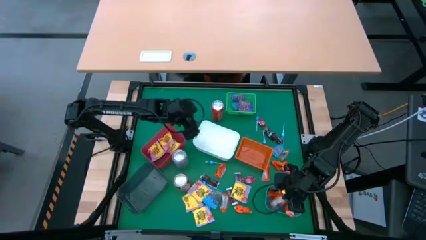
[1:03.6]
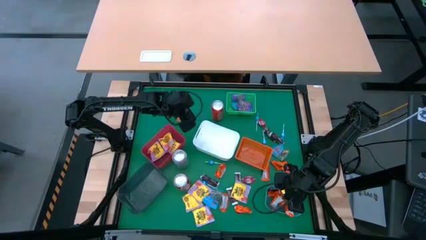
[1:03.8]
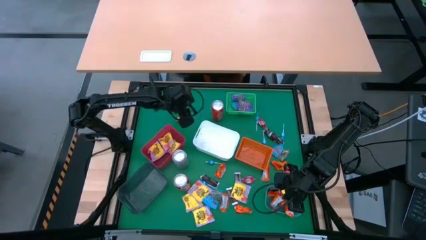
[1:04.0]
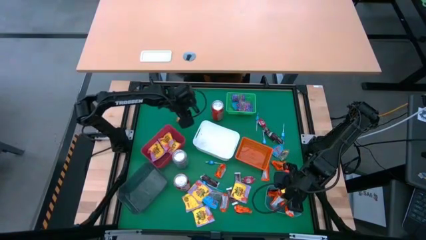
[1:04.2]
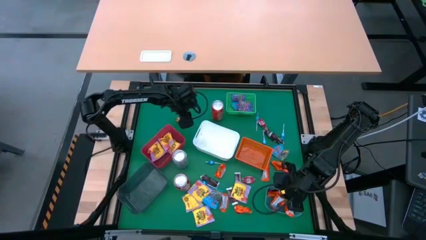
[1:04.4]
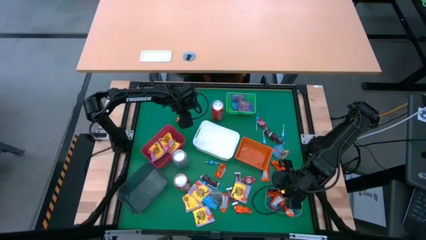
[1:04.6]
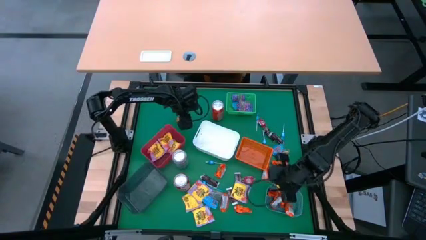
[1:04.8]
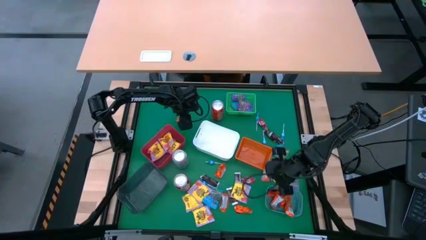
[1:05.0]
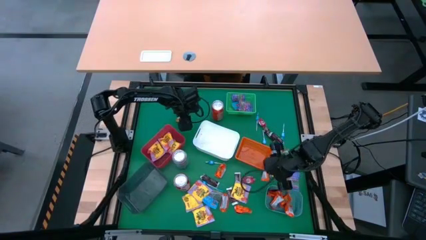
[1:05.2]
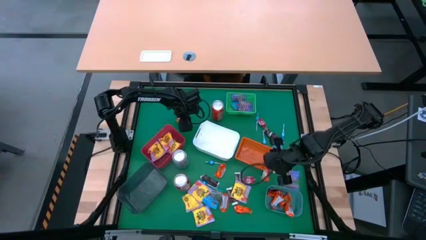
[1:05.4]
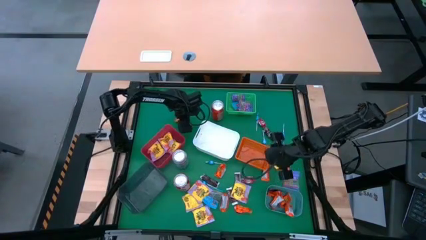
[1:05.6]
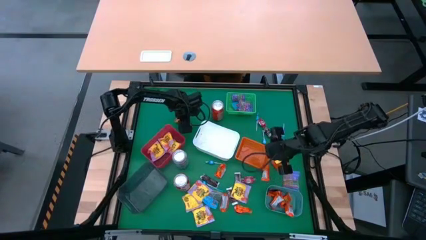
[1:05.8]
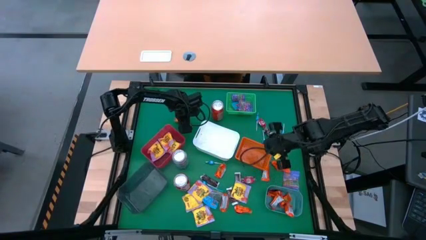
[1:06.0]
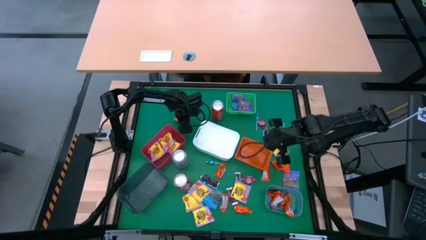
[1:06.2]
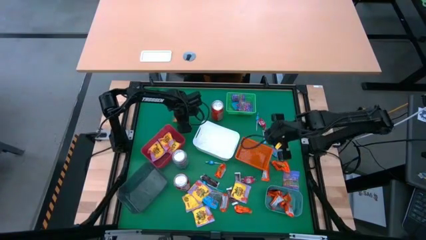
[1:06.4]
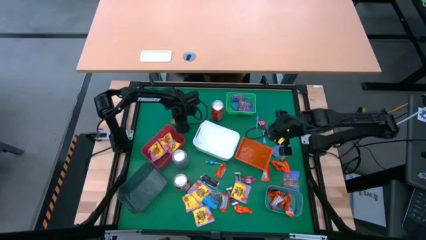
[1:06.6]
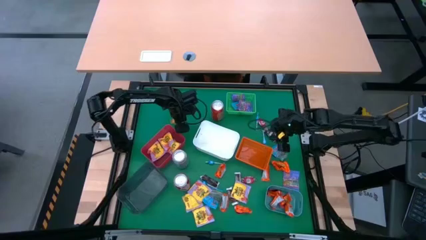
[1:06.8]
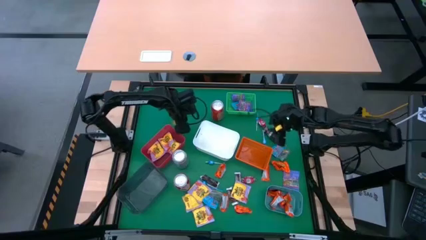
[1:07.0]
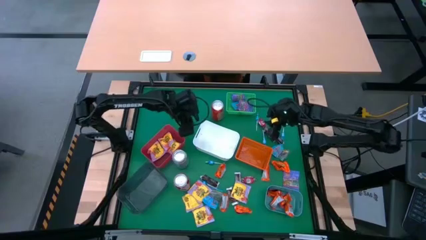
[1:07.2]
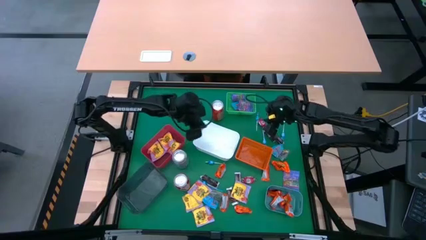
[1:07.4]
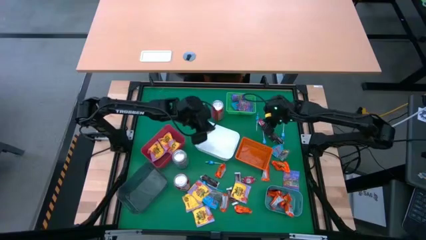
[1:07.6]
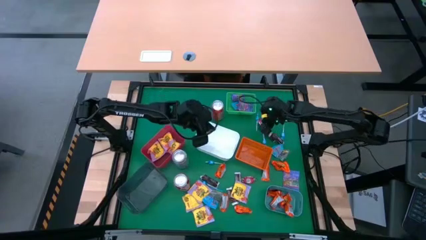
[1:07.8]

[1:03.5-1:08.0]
Task: Sort candy
Put the yellow chocolate into the white bin

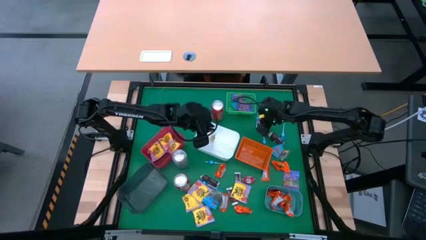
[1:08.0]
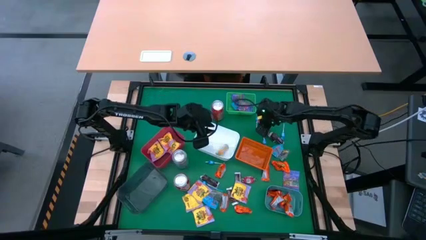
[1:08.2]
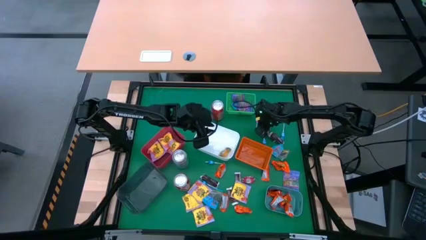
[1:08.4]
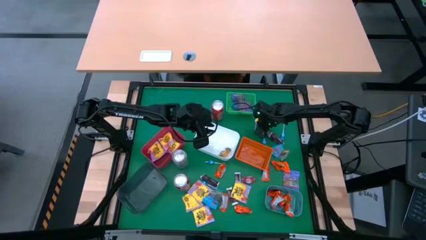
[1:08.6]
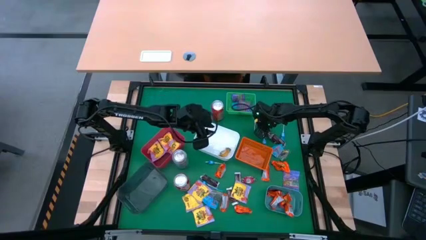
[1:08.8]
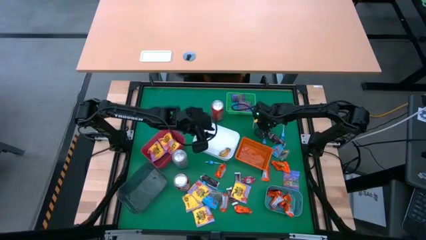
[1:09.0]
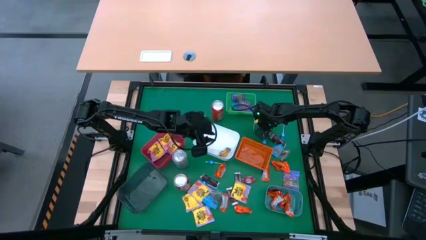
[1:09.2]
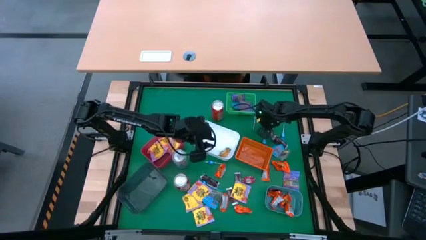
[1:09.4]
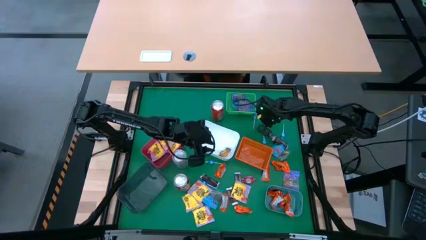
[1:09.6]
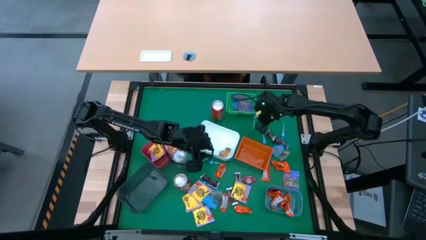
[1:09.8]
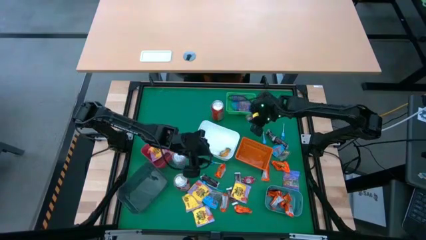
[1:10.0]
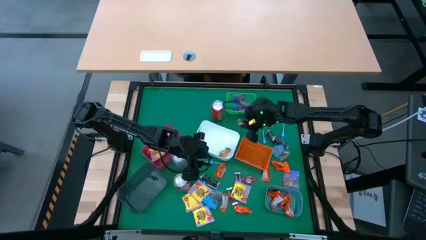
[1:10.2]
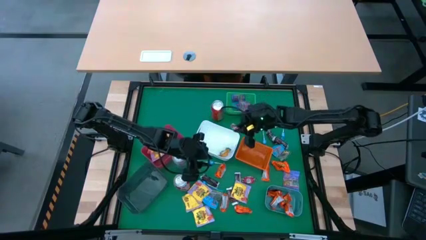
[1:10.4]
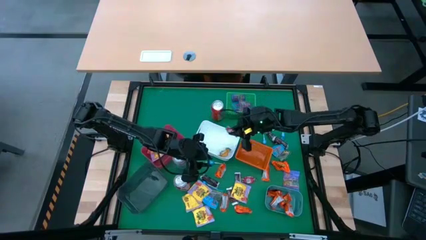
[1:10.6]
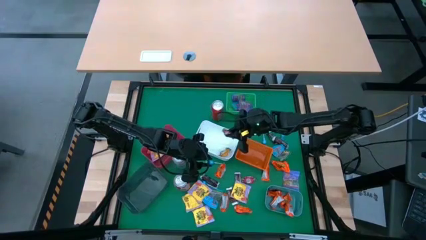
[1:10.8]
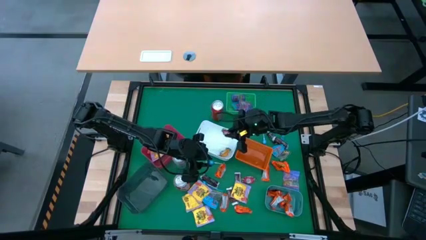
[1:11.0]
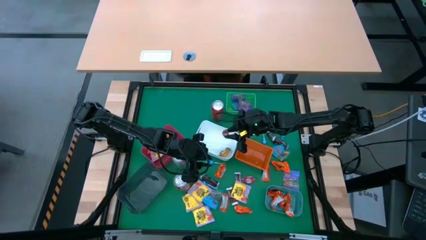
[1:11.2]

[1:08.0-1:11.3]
Put the pink chocolate into the white bin

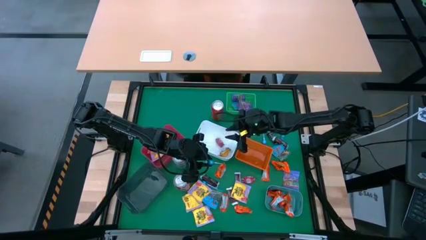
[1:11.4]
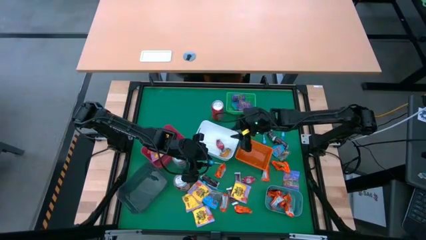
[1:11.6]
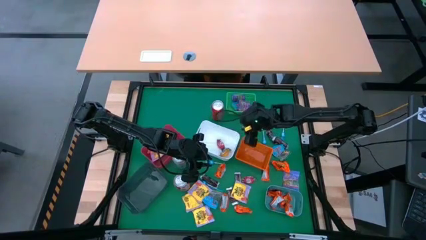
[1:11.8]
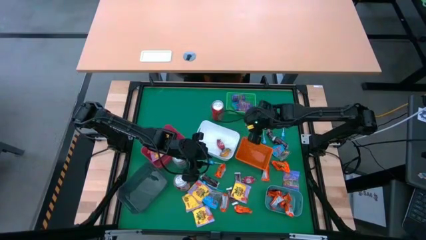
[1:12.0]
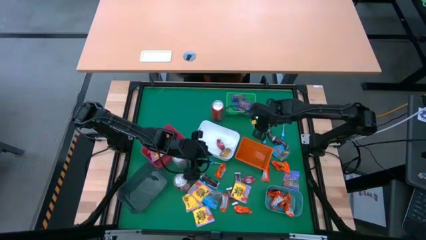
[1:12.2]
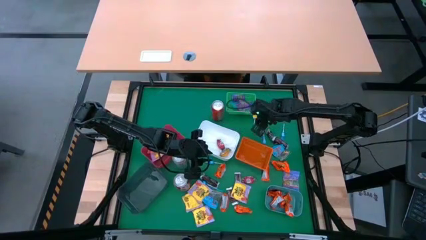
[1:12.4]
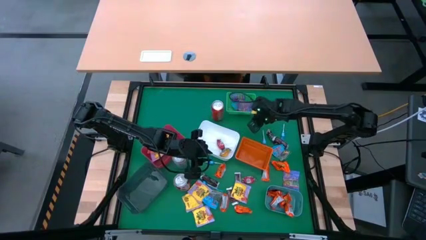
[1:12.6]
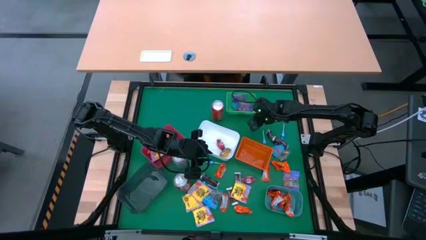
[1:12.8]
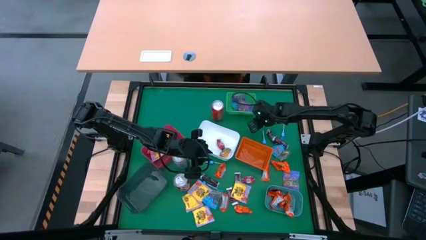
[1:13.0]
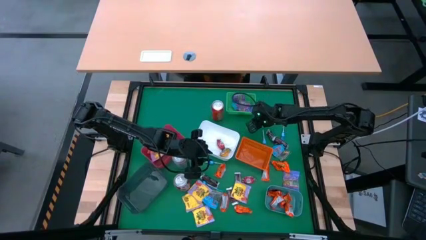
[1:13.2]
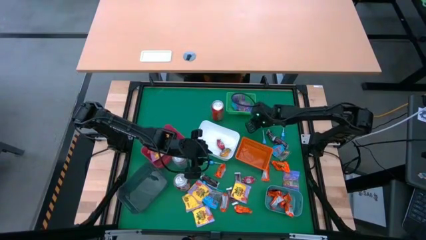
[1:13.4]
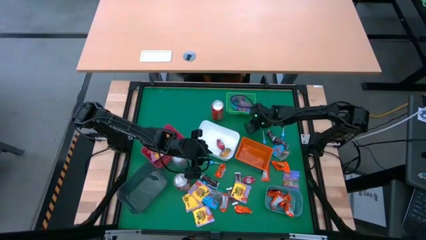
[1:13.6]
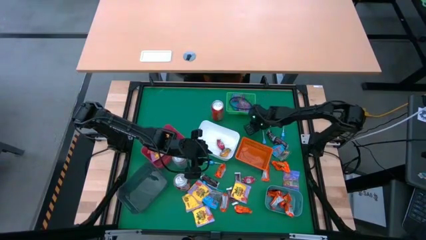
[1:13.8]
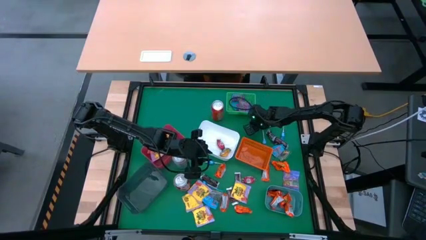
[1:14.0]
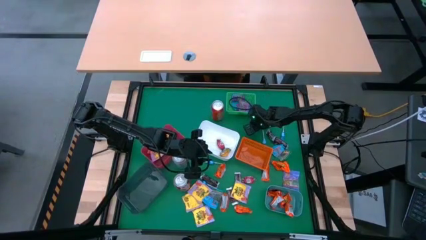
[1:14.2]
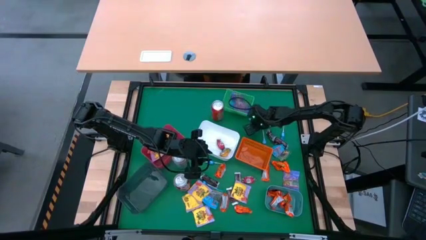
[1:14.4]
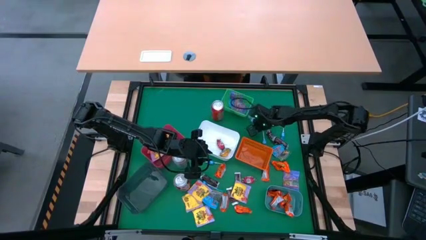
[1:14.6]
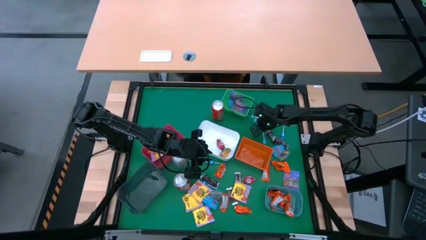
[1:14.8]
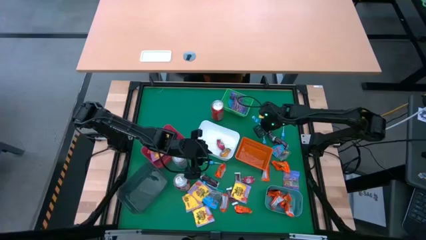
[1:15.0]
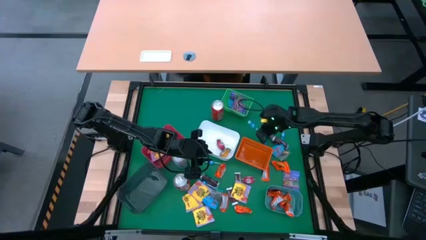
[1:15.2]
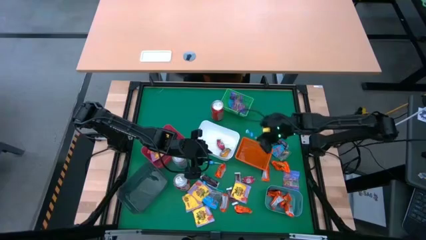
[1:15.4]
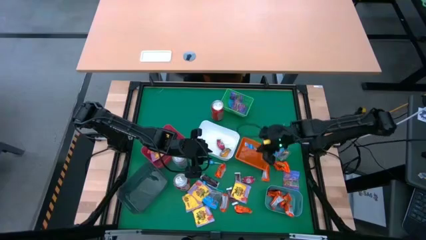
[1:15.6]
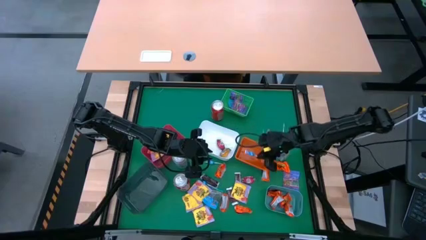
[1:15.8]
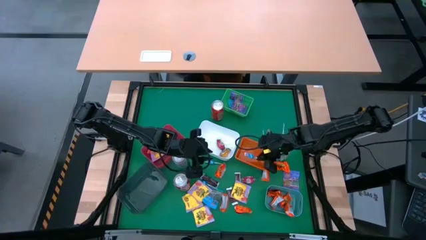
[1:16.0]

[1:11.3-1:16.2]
Put the blue lollipop into the orange bin

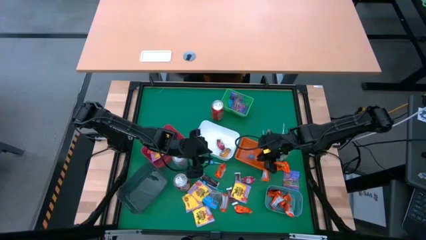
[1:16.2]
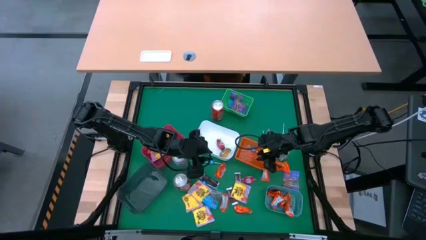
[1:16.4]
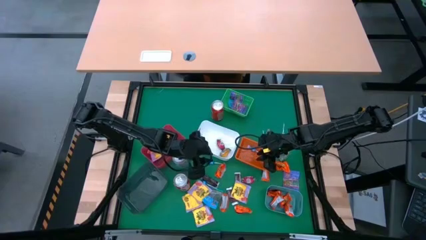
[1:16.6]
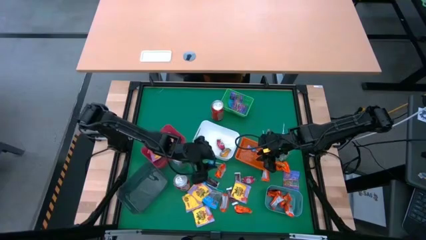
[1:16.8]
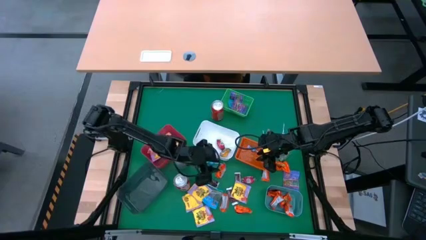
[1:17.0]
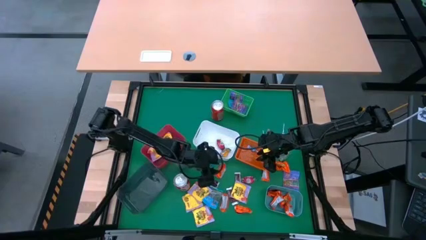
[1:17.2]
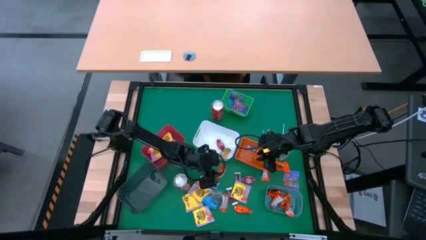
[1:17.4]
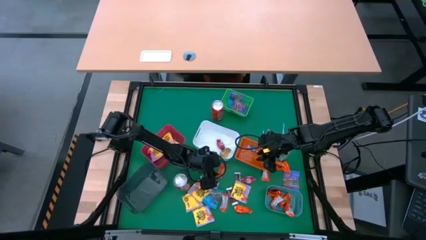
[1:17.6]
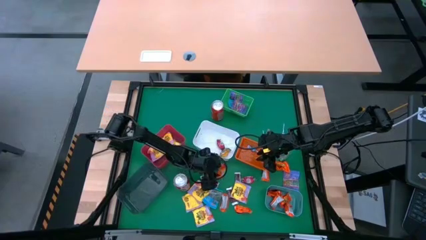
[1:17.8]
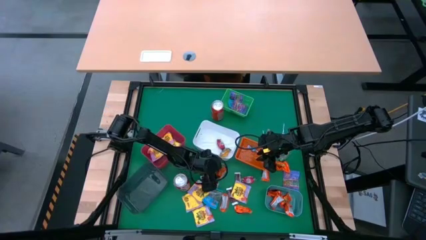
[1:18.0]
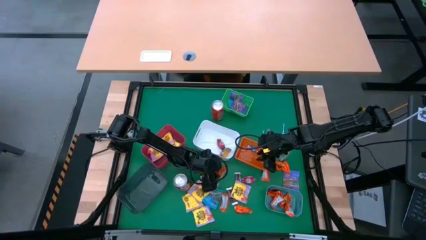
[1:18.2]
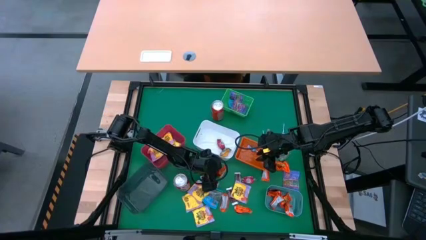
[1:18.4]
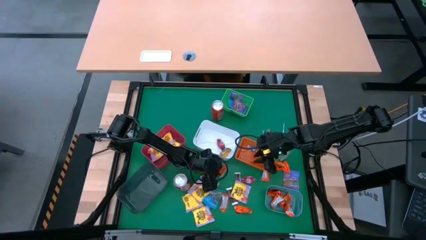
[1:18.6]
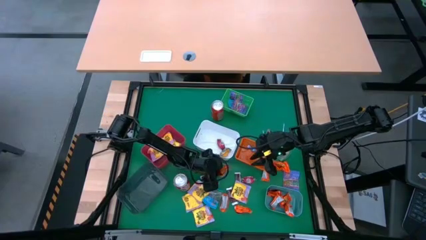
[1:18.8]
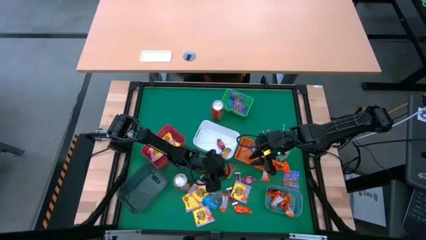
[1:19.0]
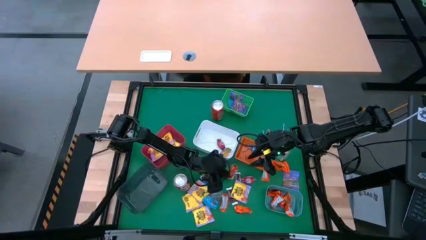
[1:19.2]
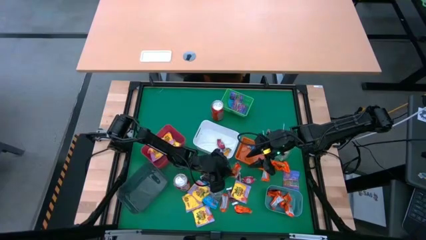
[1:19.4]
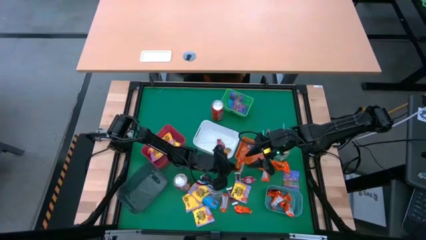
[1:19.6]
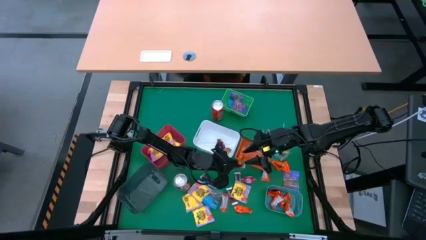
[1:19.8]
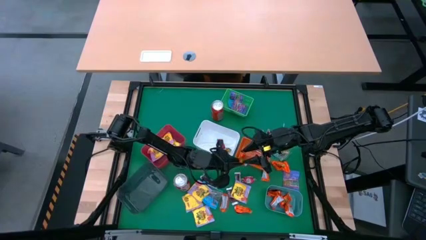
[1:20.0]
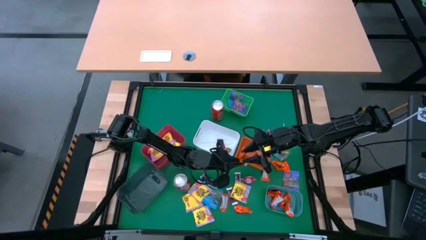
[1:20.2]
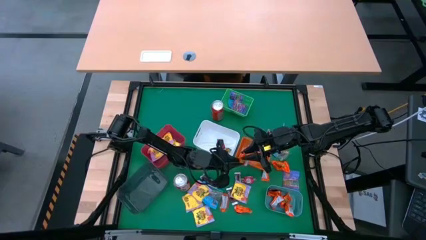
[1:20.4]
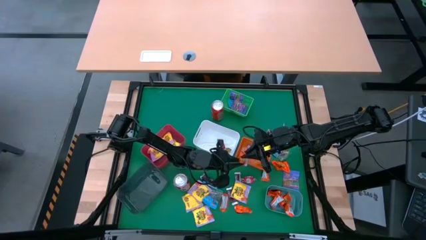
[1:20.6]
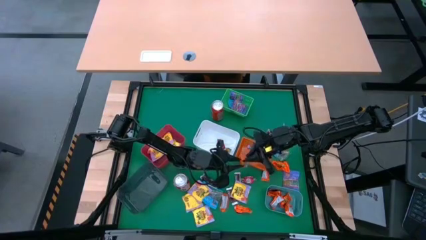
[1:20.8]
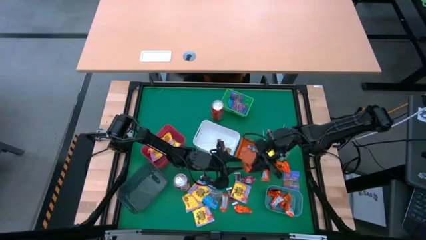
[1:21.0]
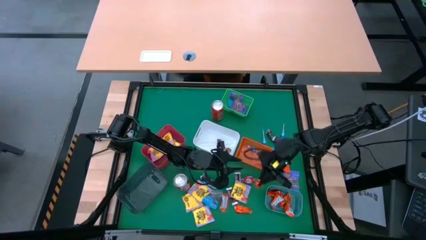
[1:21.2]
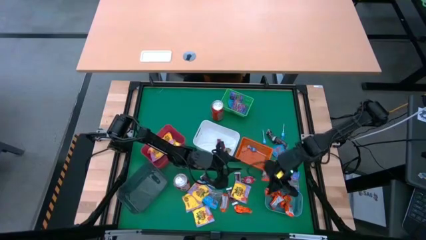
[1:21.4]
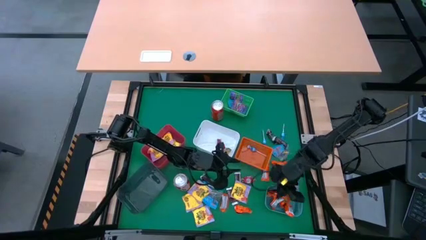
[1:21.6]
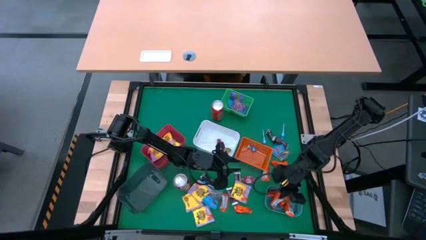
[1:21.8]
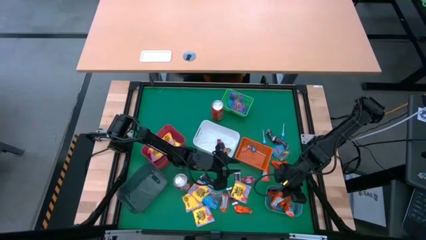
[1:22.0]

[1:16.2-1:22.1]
Put the orange chocolate into the blue bin
